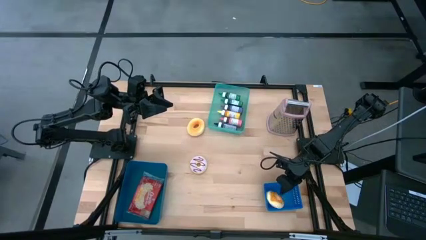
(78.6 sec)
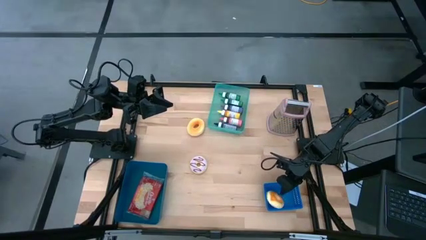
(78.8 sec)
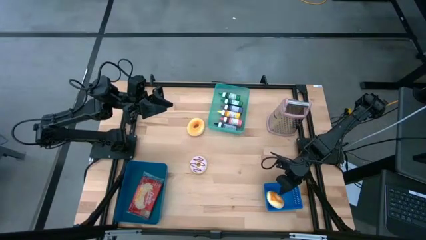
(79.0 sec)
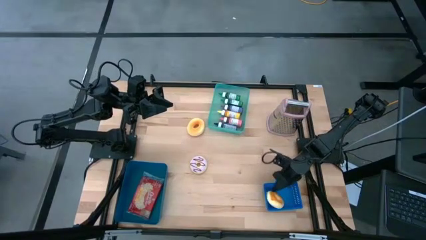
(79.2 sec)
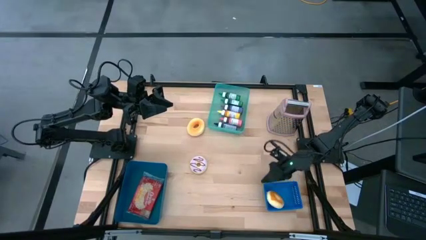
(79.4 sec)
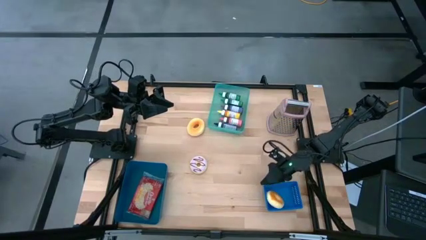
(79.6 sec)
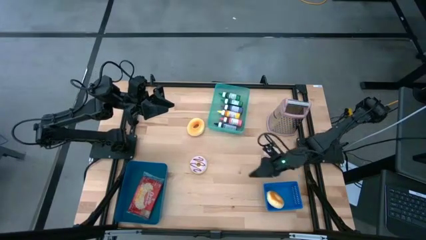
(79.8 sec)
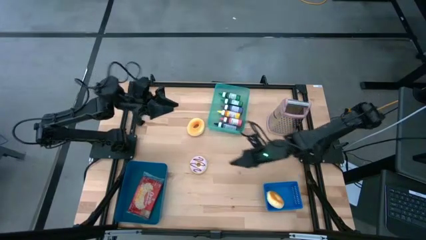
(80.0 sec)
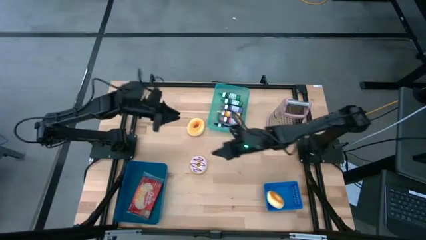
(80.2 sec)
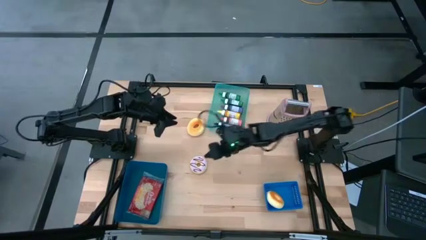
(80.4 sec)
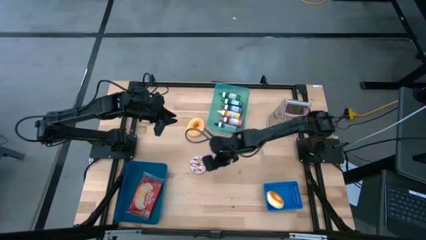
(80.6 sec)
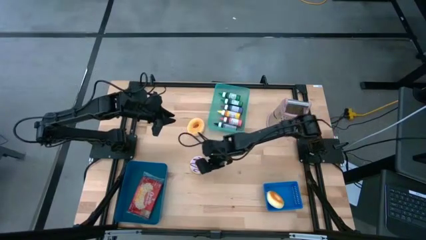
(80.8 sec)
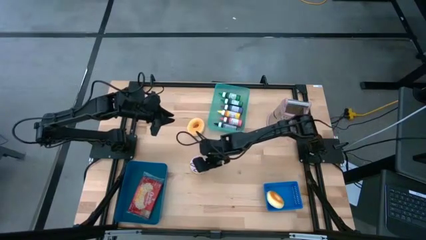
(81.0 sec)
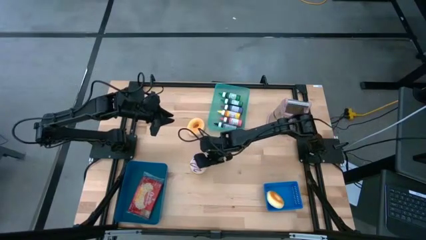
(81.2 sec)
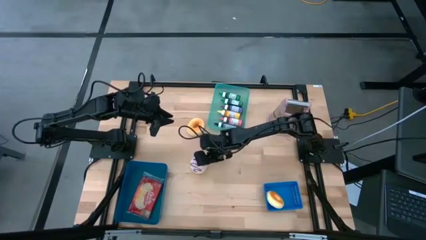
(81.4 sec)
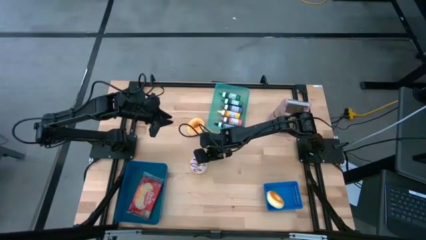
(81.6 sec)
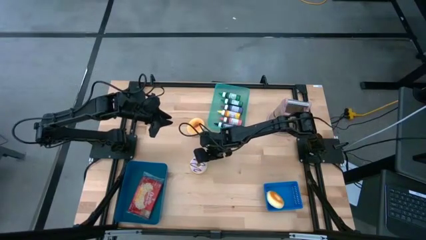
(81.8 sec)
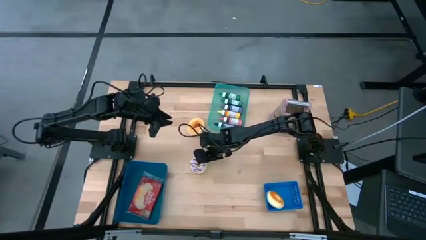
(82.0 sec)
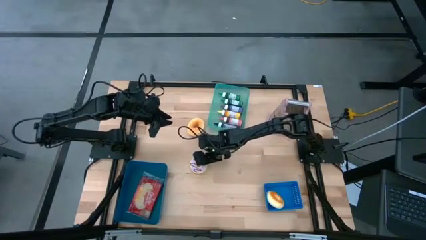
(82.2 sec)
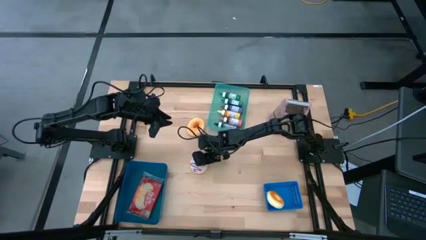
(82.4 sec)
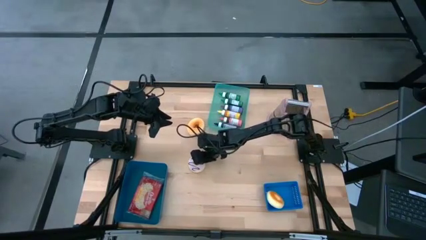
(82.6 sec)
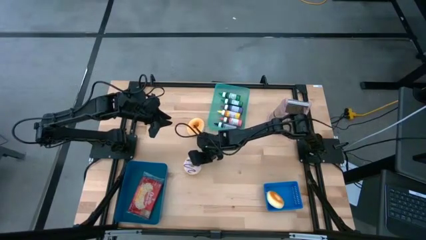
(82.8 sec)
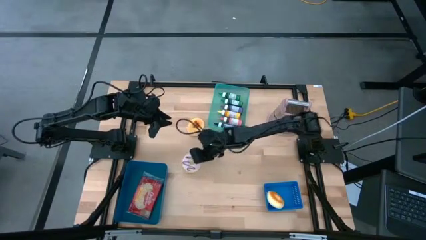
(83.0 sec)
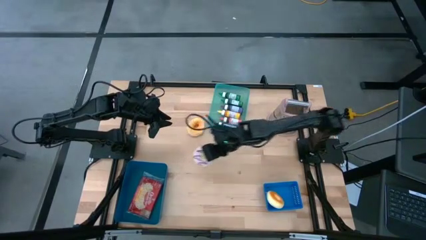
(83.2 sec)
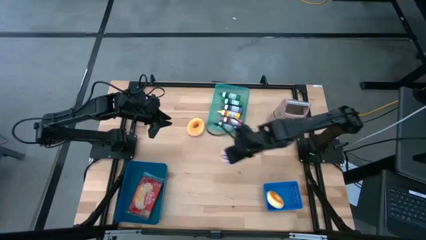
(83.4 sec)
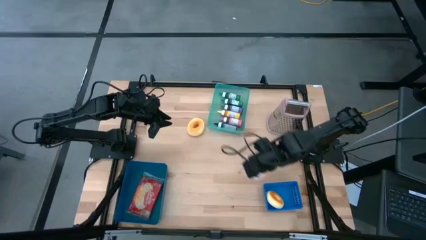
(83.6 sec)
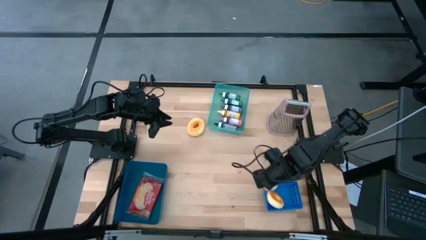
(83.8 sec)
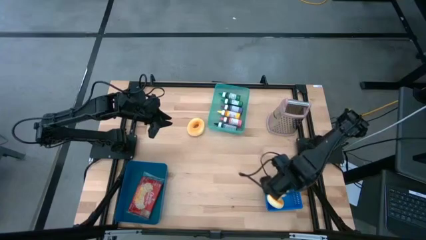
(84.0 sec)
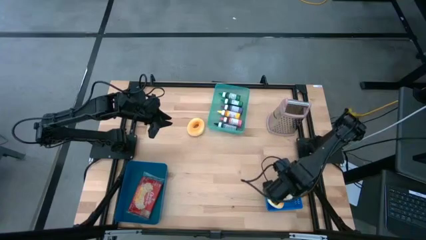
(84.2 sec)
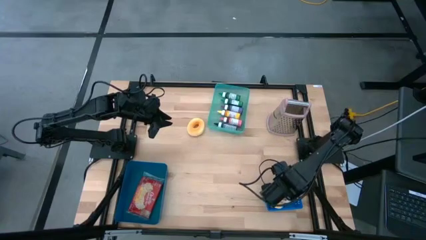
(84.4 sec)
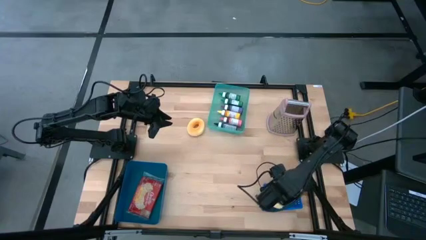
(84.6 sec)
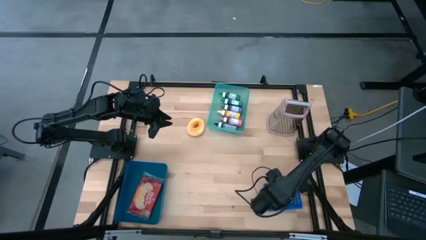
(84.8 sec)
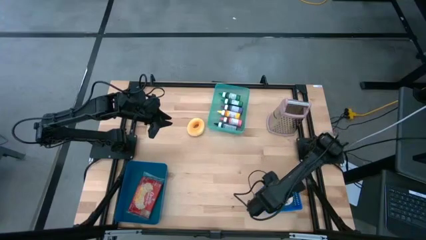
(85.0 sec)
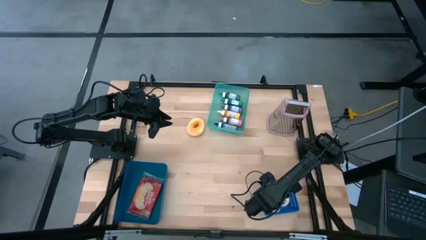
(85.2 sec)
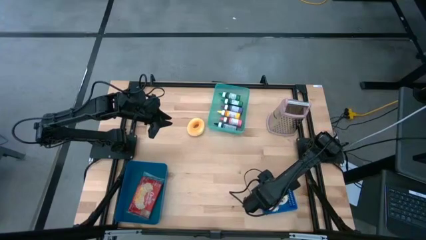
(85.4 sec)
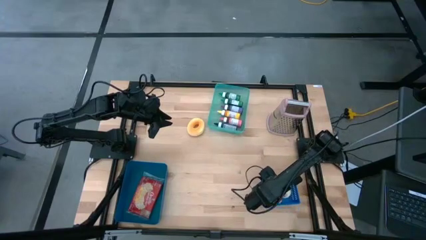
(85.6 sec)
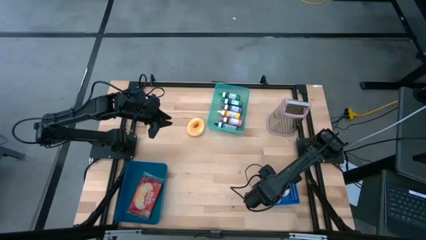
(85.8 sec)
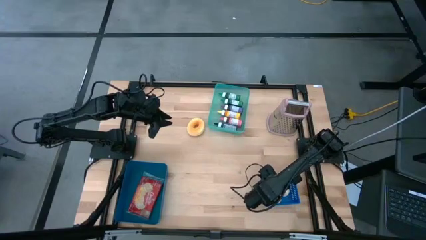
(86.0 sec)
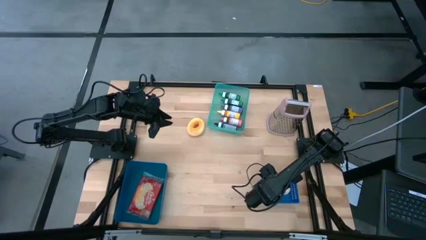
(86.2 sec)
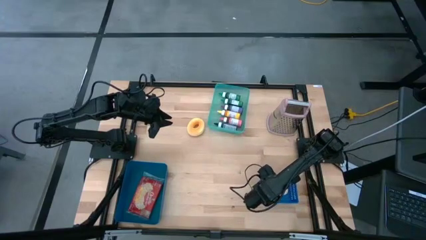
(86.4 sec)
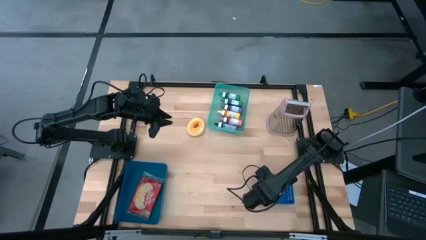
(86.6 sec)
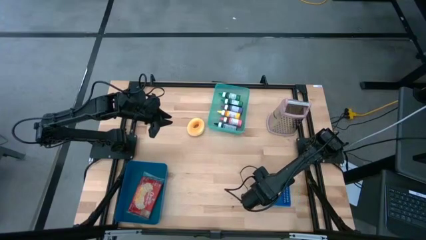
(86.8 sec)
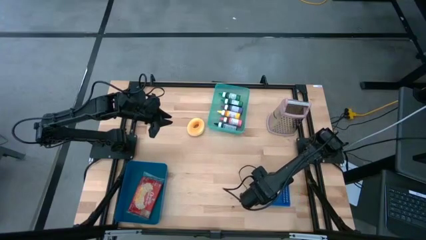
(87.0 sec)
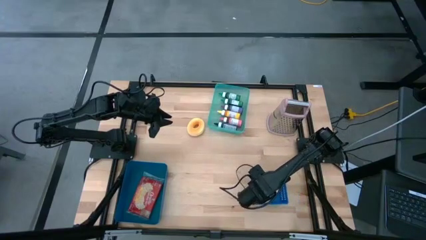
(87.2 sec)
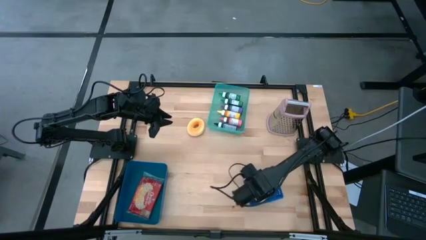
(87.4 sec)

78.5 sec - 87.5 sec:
Put the violet donut into the blue bin

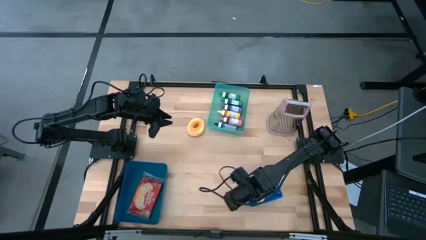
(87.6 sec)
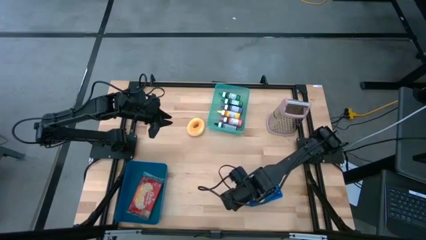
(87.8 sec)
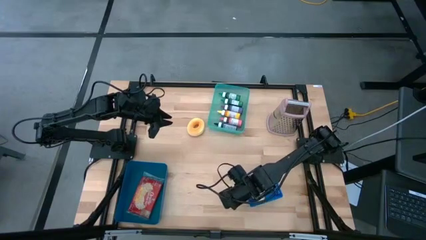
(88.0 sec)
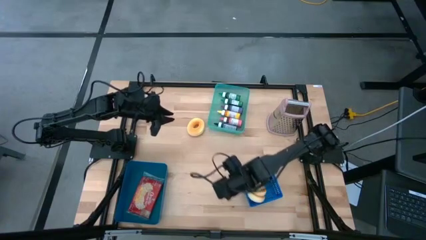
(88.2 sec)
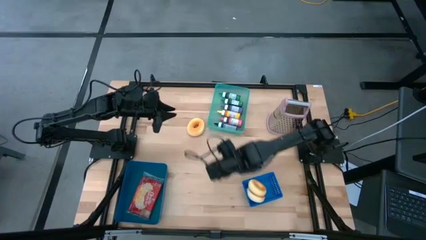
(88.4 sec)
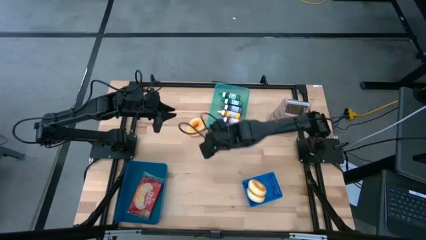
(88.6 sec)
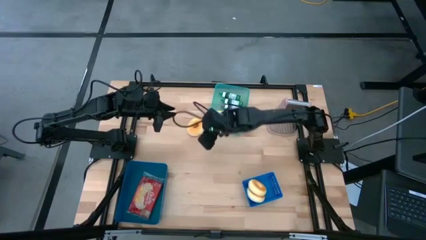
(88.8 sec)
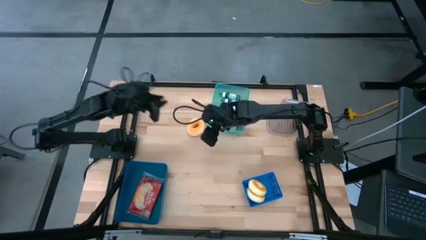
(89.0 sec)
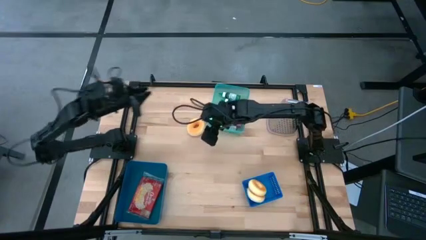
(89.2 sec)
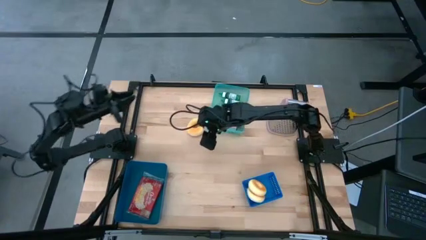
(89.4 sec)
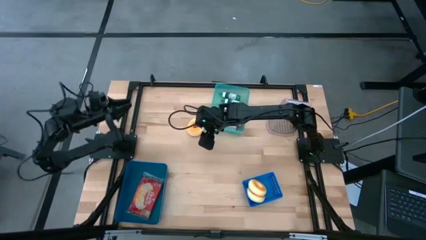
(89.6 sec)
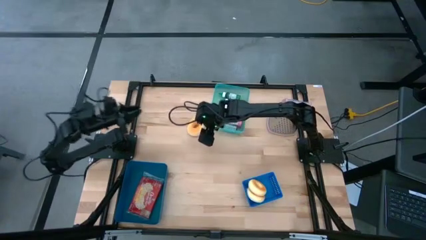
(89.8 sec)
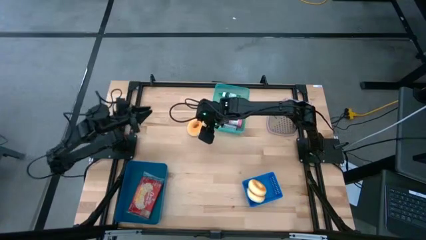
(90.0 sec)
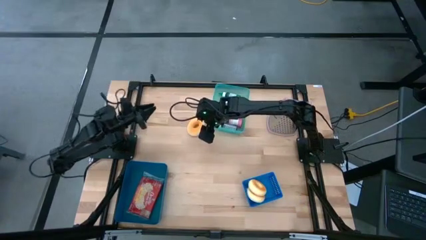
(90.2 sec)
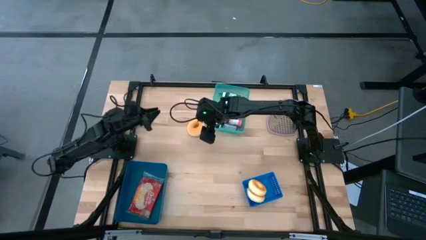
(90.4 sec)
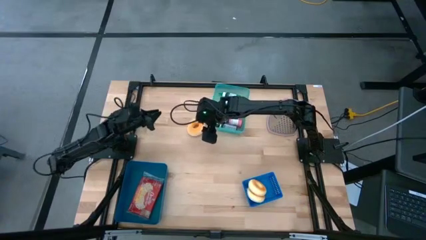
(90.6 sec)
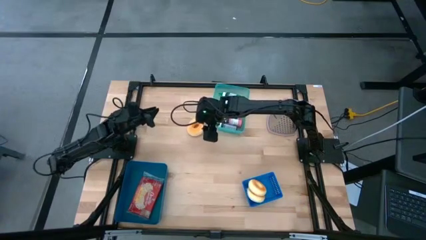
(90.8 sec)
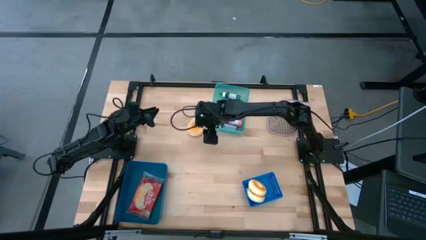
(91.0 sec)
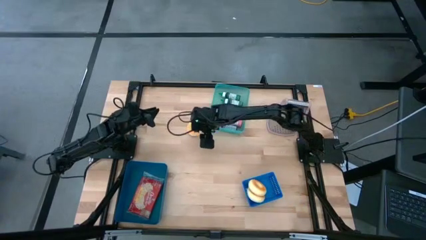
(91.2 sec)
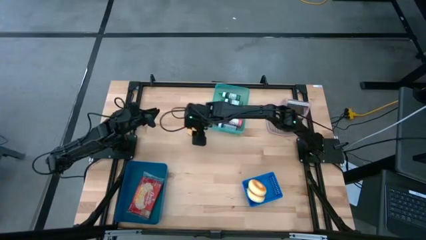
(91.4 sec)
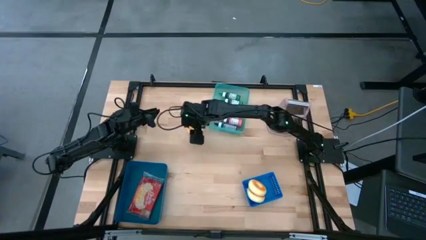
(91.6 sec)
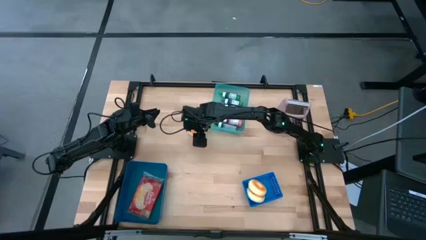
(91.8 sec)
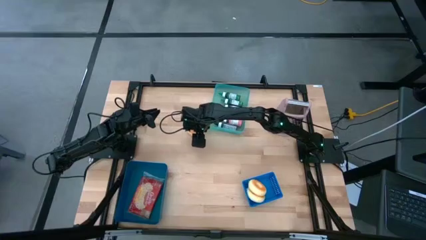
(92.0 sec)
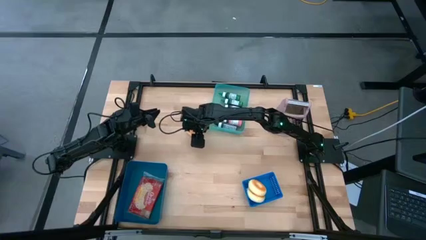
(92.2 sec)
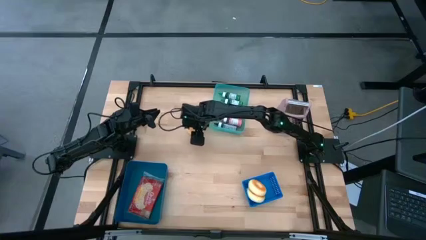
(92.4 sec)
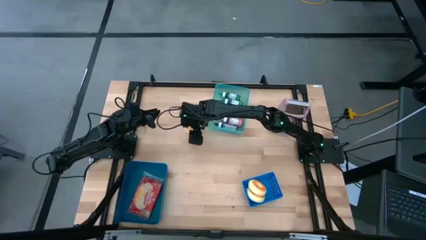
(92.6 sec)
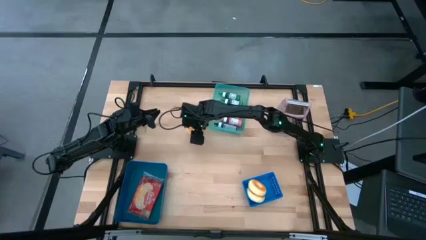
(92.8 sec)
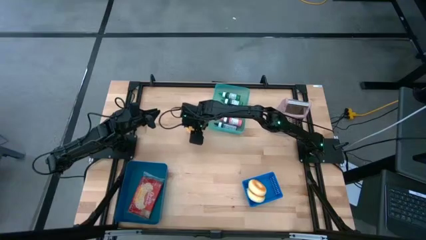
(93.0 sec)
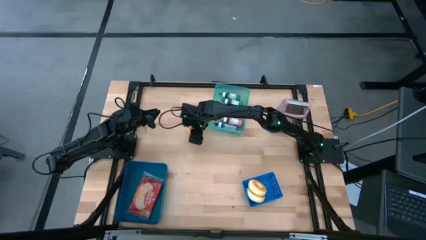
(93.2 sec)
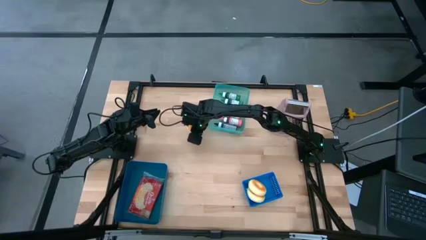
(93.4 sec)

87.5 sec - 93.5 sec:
Put the pink donut into the blue bin
